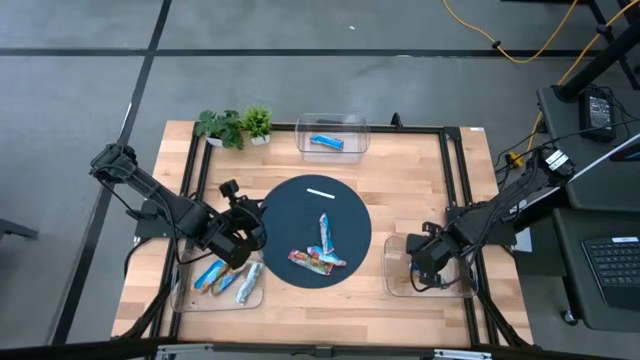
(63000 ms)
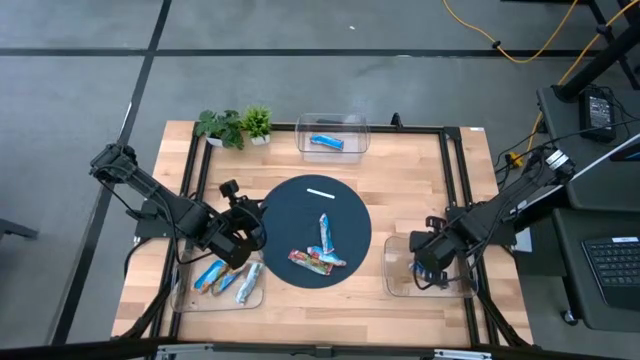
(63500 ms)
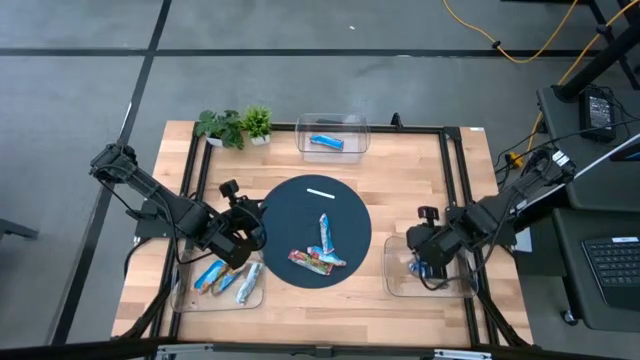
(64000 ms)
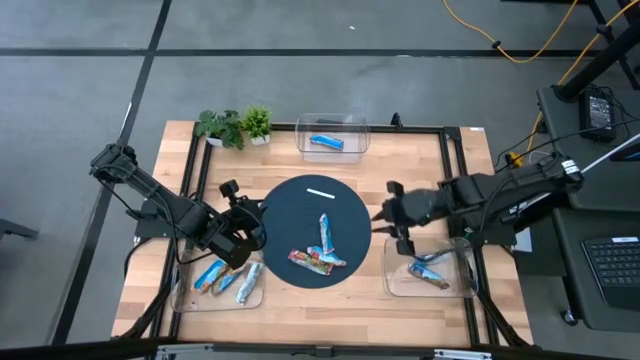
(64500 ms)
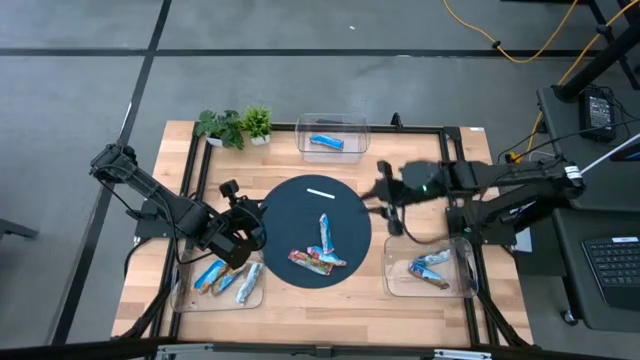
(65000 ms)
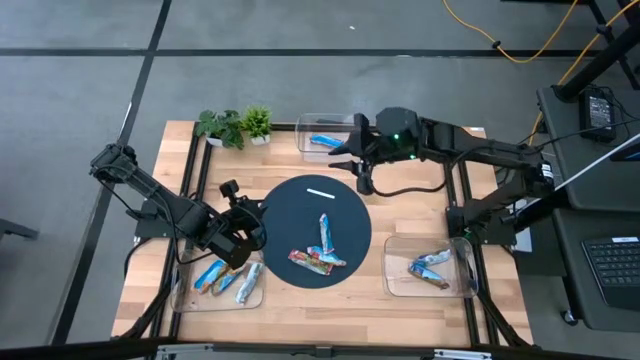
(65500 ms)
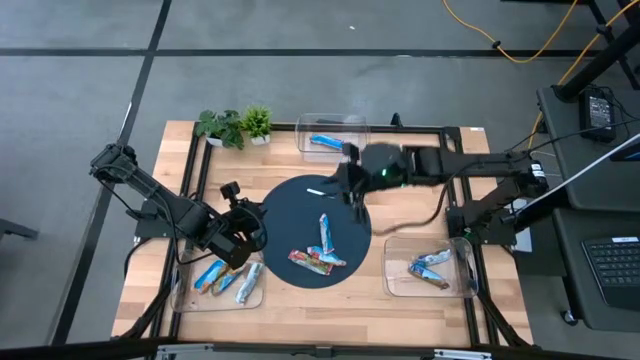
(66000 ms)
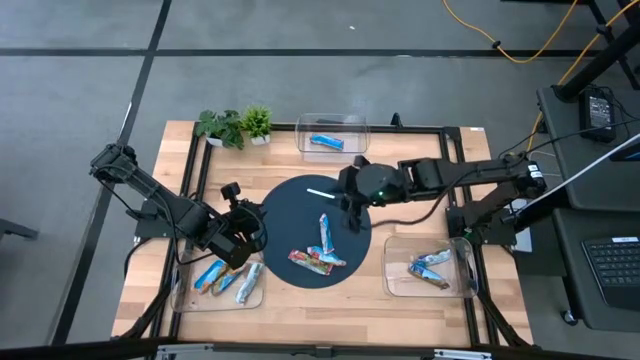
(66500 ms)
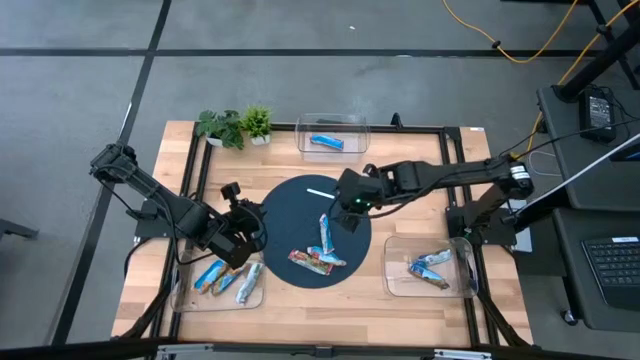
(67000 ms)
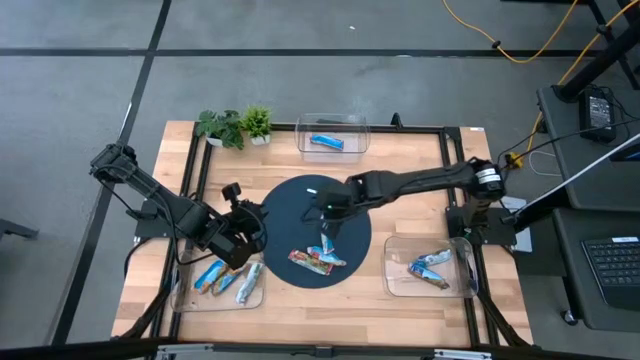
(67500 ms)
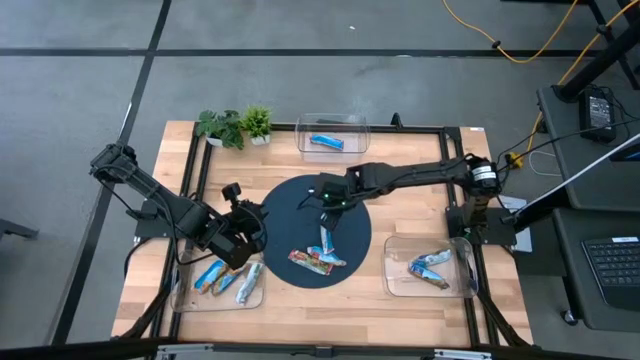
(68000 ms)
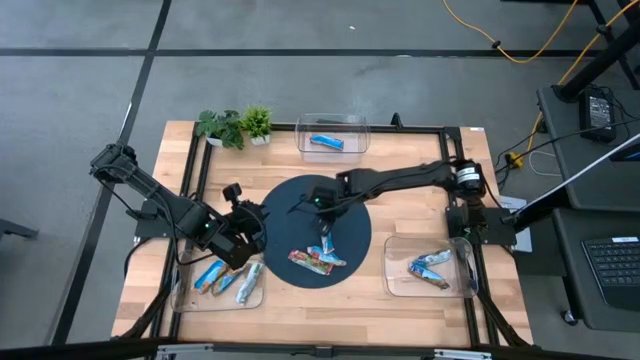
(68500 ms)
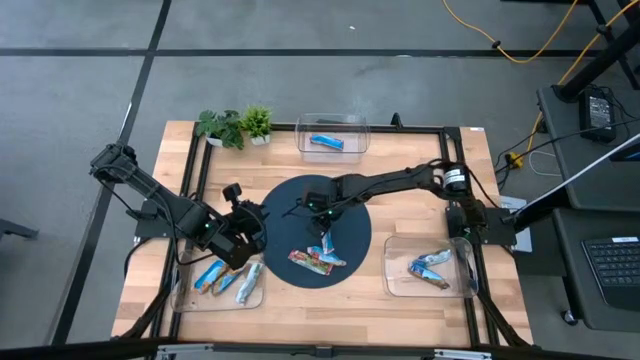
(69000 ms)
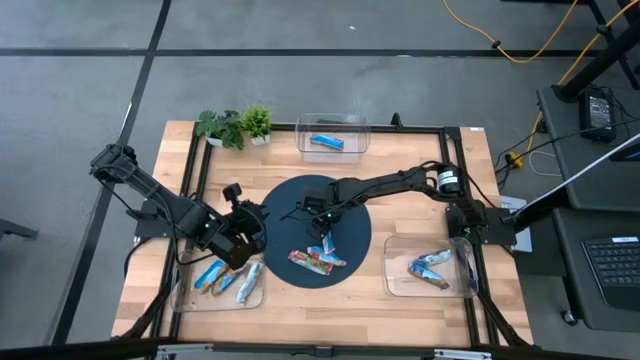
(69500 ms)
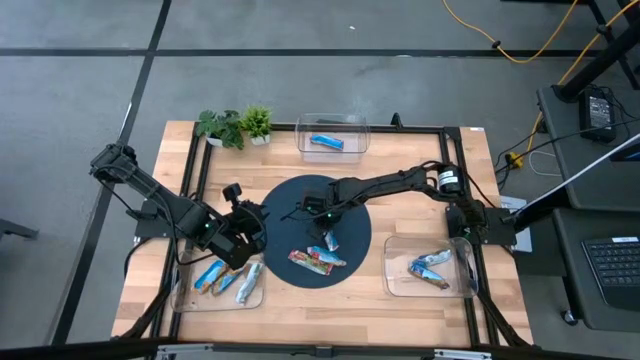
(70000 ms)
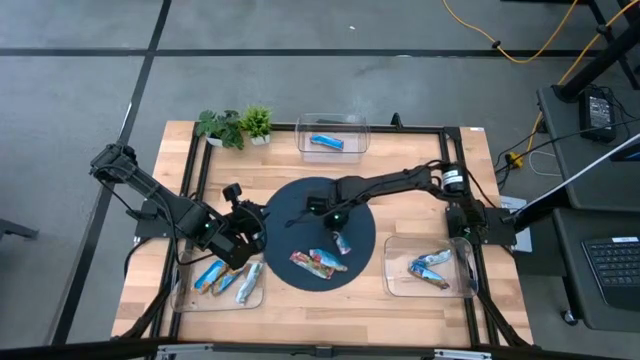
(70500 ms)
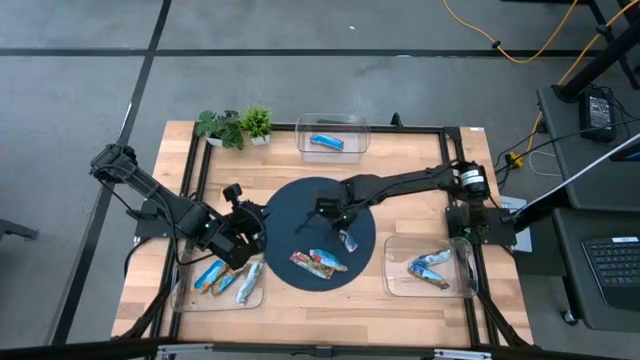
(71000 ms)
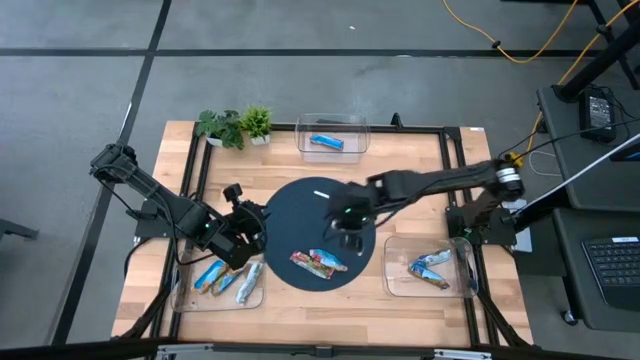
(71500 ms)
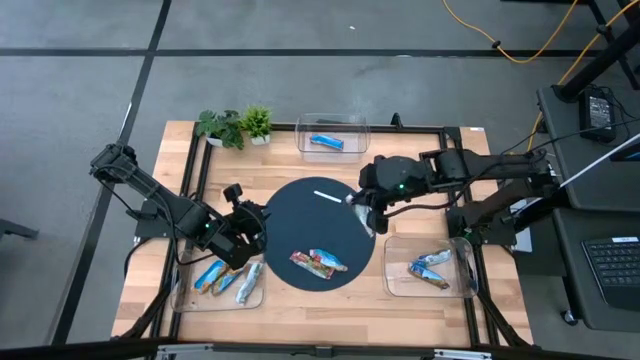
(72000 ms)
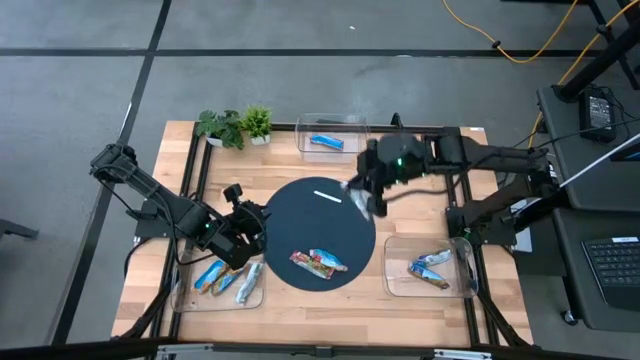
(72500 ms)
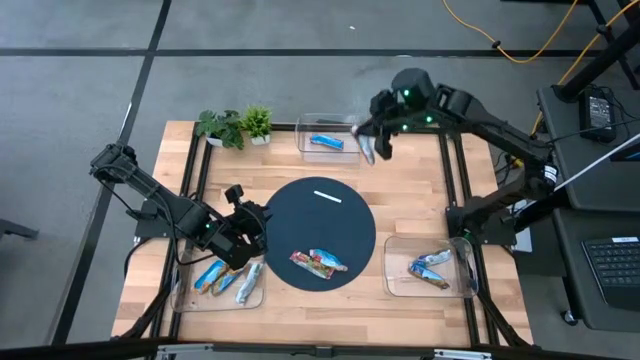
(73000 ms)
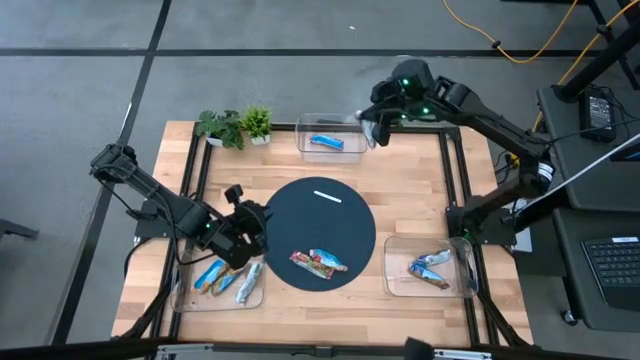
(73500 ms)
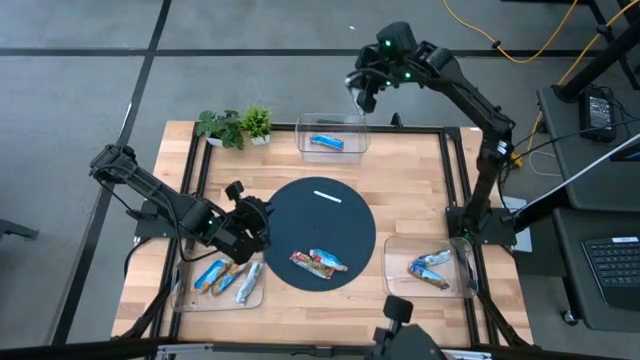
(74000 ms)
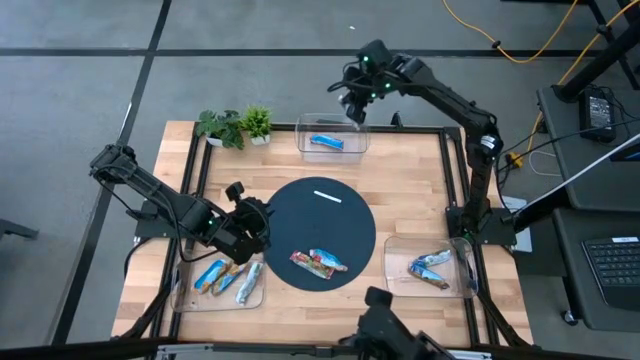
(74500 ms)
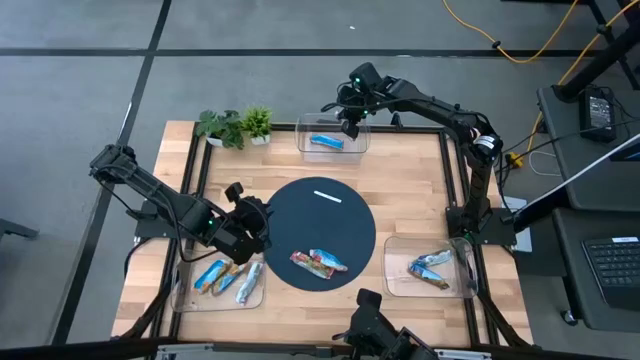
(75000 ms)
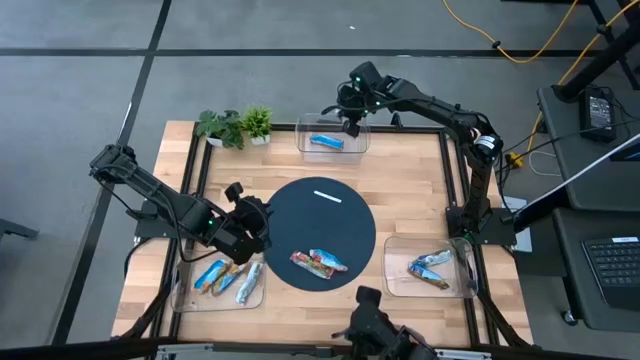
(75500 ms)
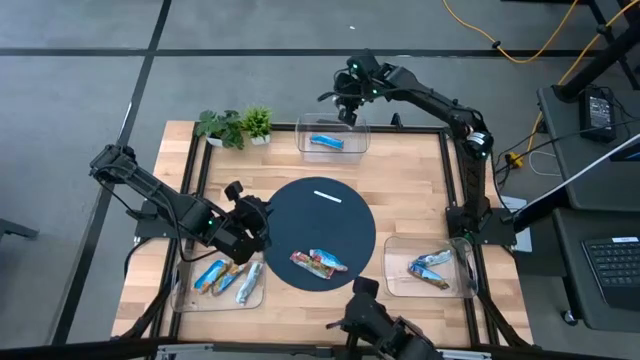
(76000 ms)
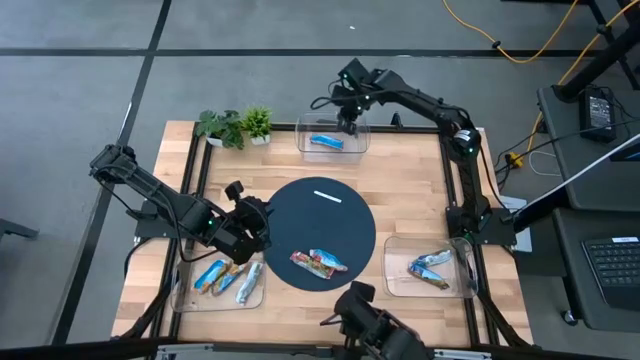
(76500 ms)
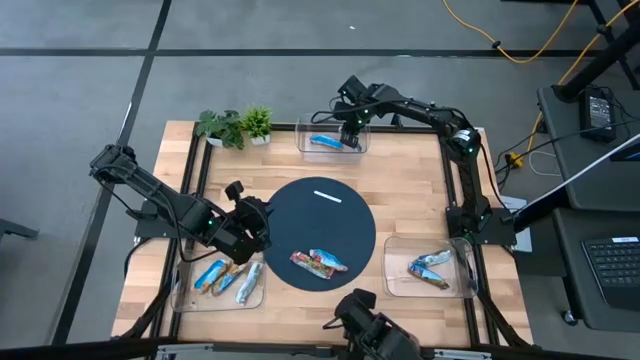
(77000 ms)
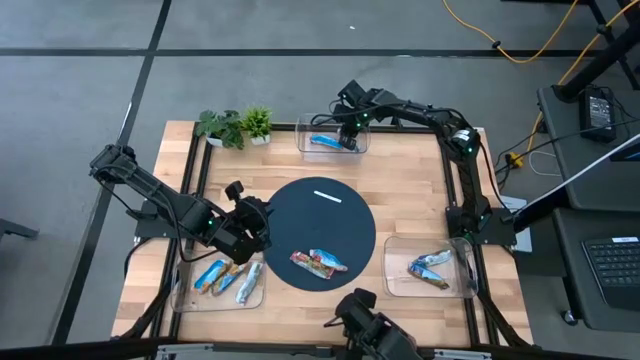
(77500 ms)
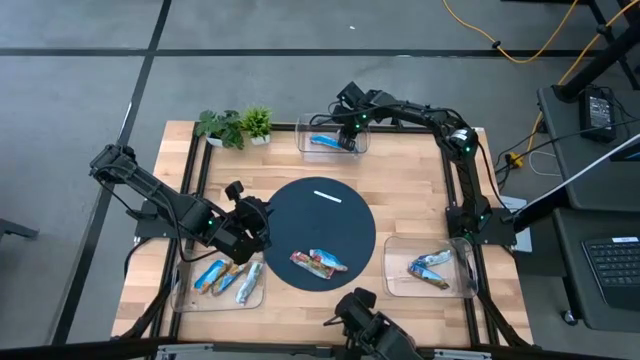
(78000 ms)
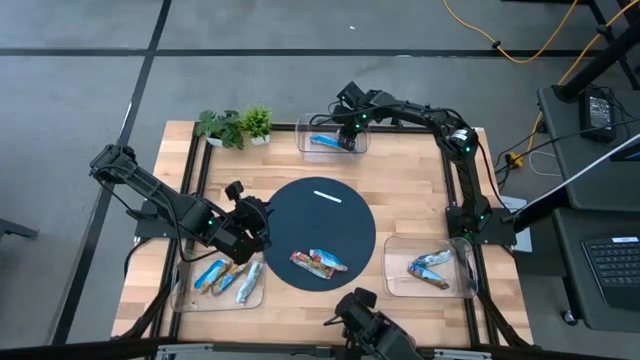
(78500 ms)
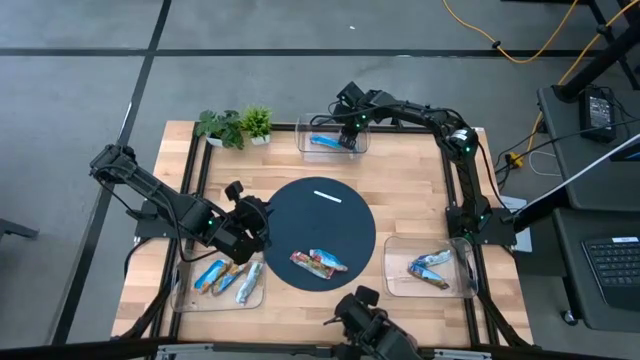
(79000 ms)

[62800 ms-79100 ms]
Task: Pick and place Granola Bars by type
Put the red granola bar into the top transparent bin

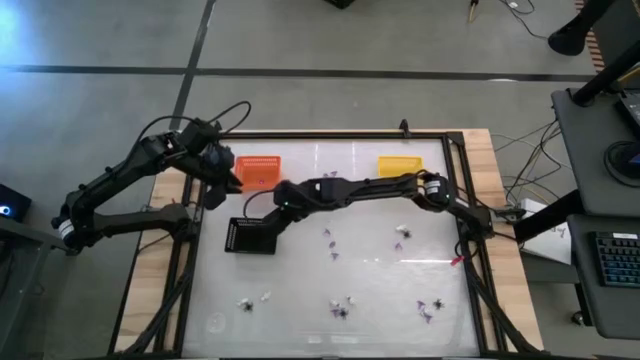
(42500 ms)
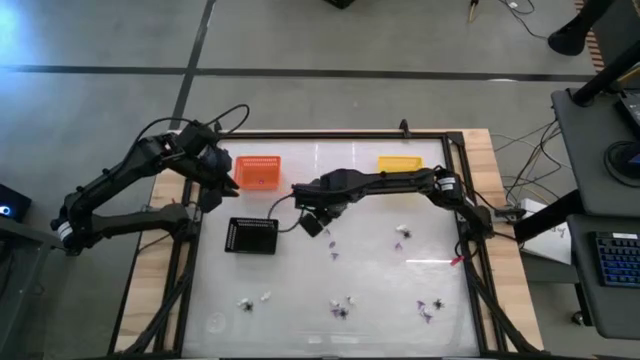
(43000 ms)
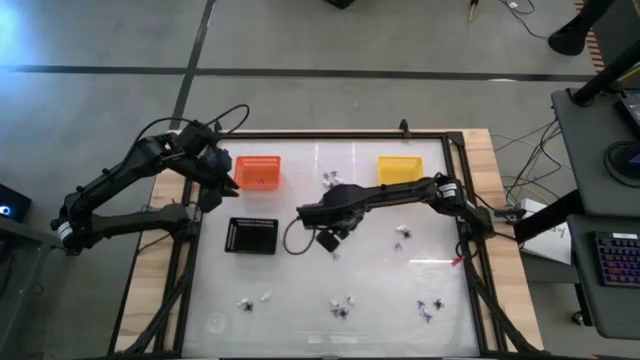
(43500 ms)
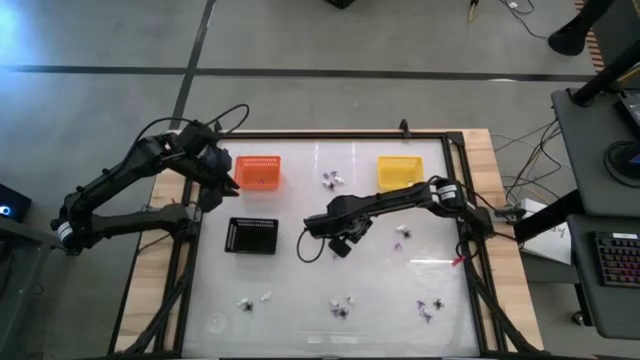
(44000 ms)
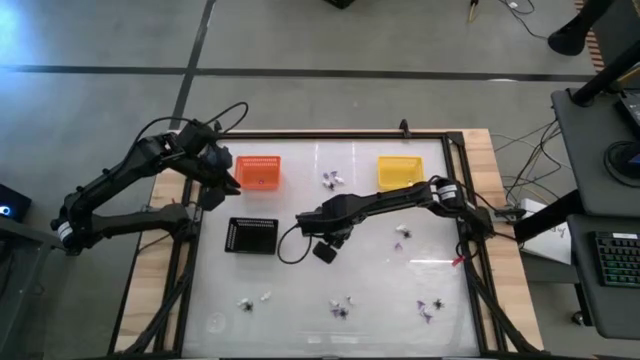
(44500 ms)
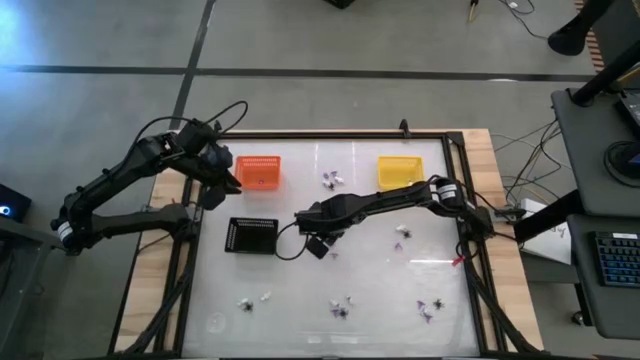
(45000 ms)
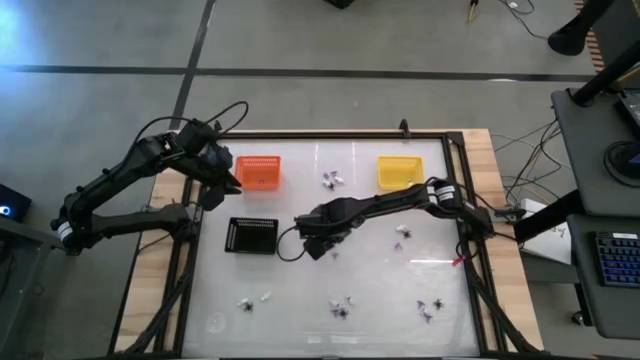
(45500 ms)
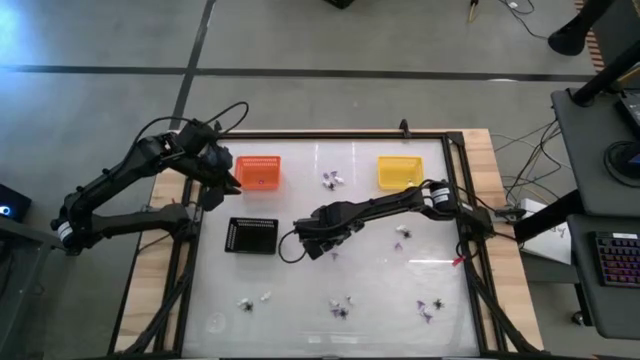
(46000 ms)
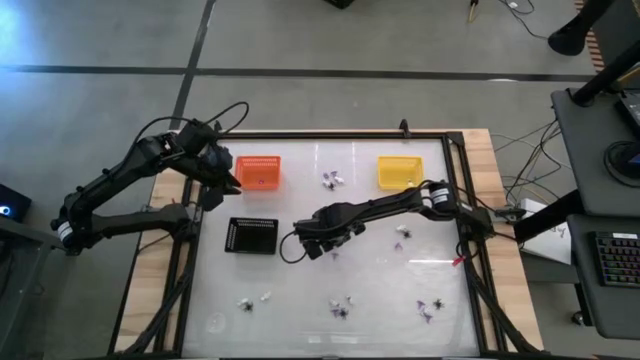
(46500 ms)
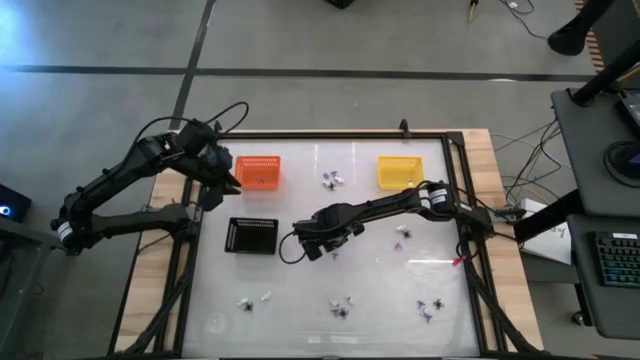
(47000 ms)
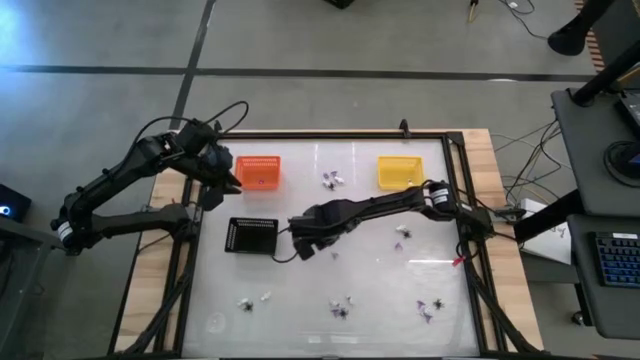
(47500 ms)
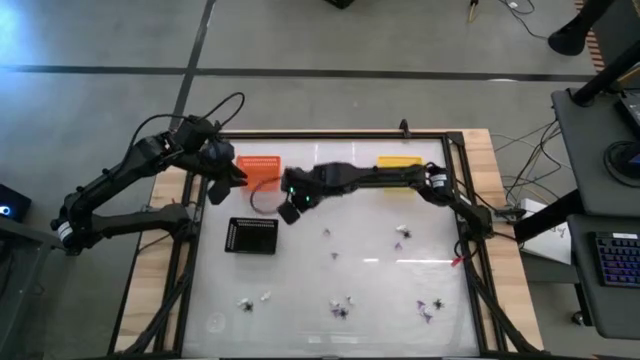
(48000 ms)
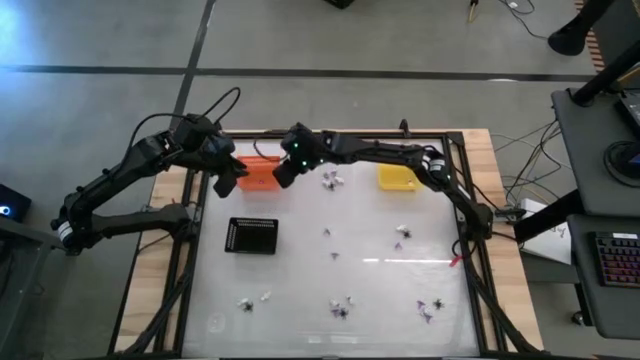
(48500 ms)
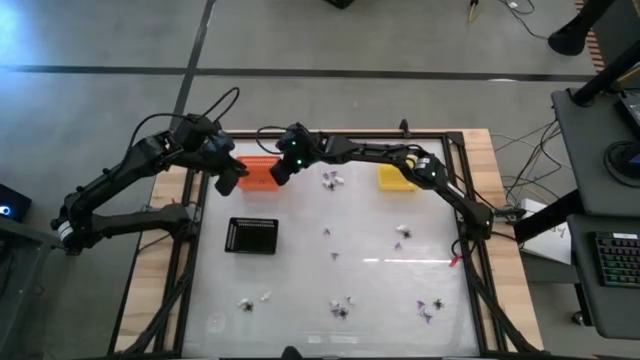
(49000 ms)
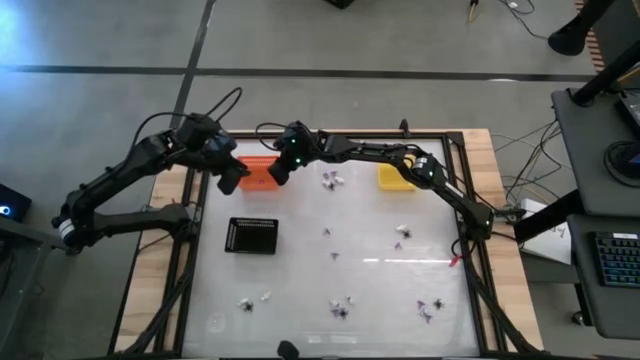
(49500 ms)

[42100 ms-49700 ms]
Task: Sort Halloween decoration
Put the violet witch hat into the orange bin
